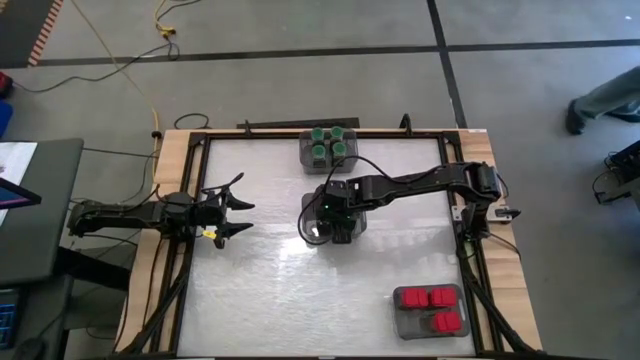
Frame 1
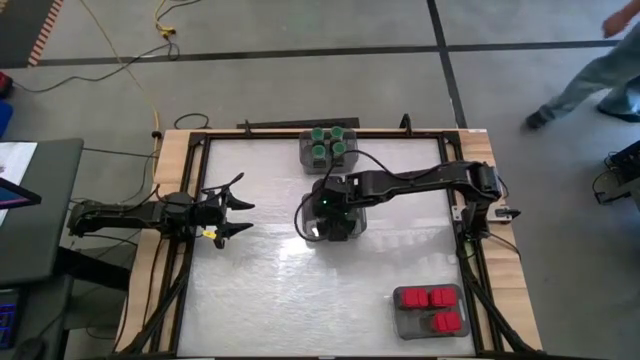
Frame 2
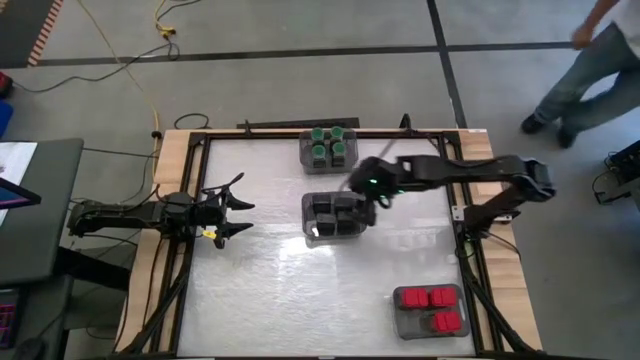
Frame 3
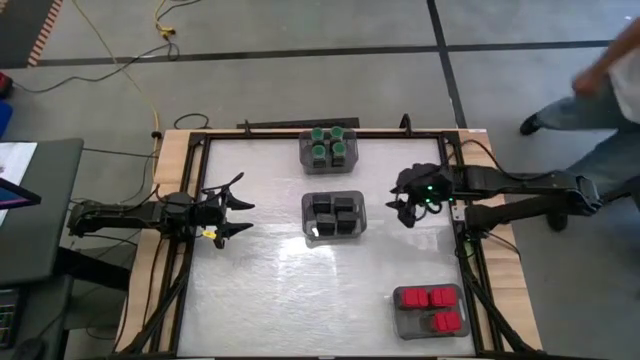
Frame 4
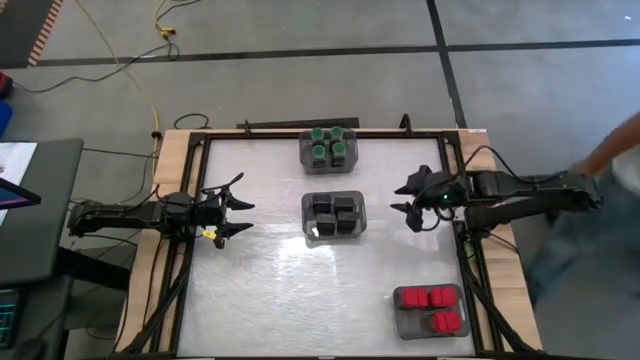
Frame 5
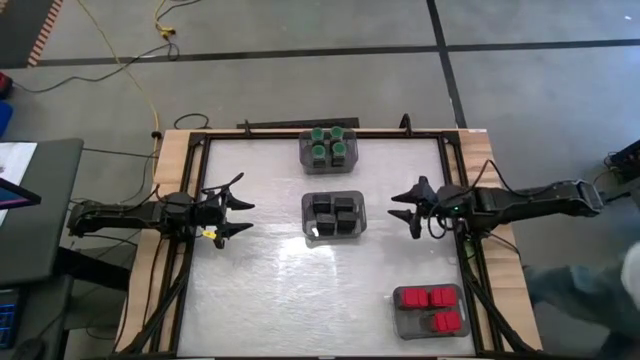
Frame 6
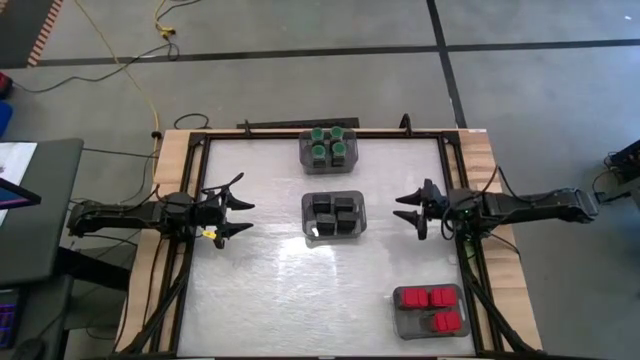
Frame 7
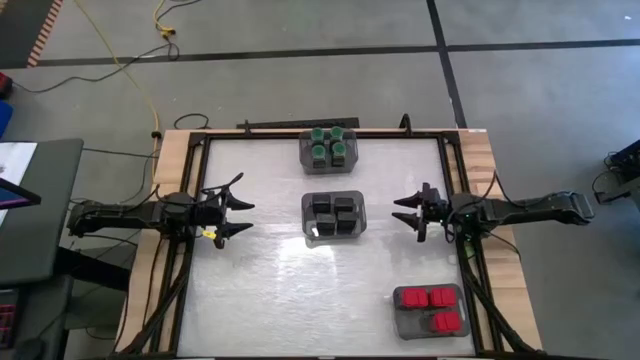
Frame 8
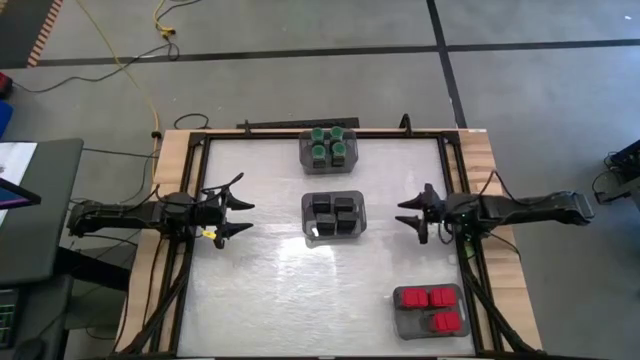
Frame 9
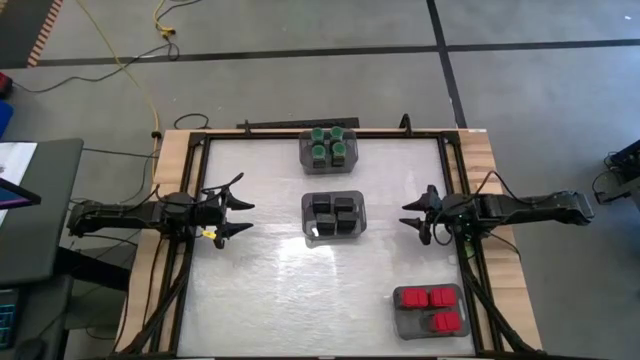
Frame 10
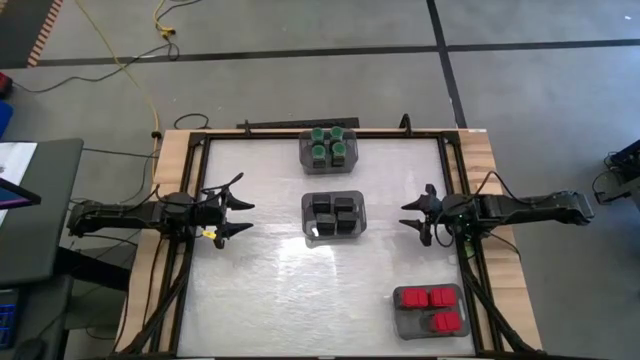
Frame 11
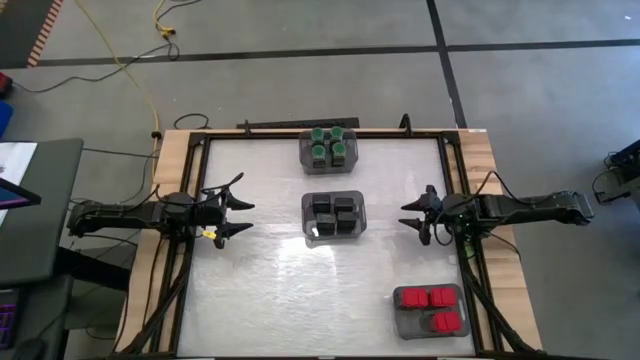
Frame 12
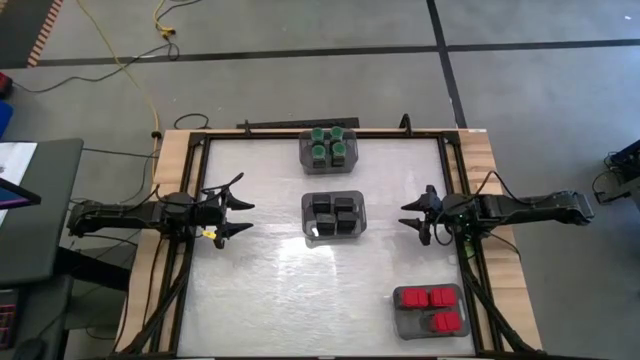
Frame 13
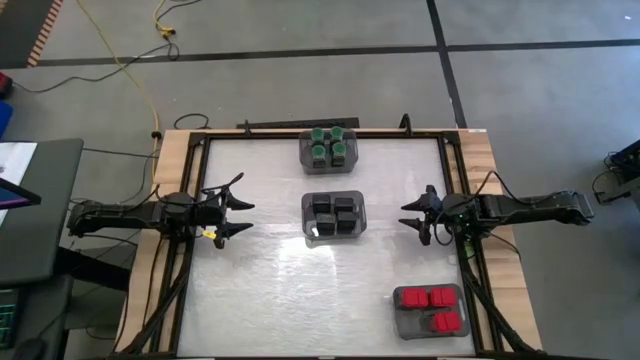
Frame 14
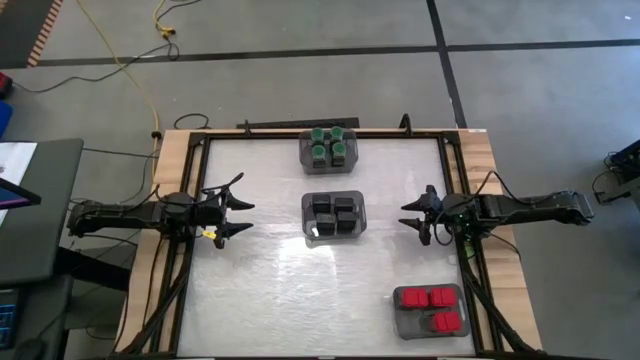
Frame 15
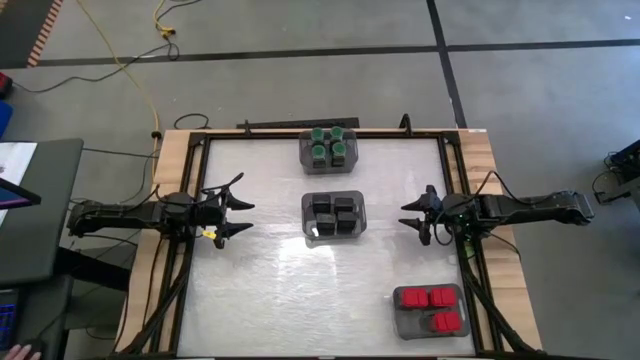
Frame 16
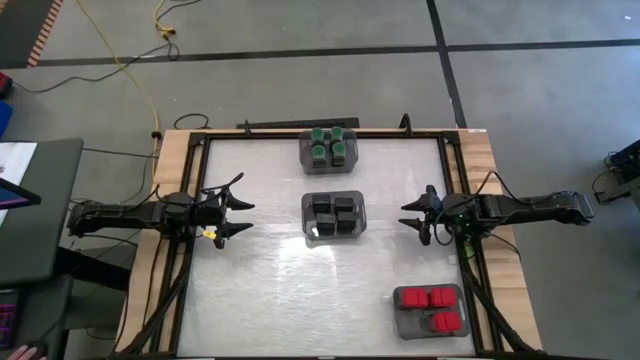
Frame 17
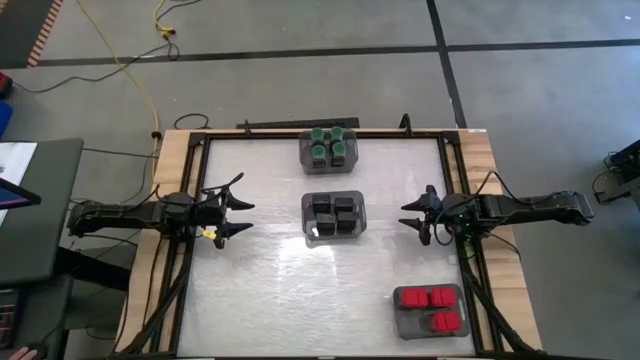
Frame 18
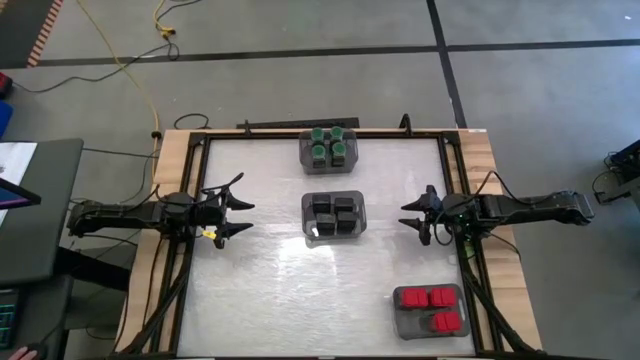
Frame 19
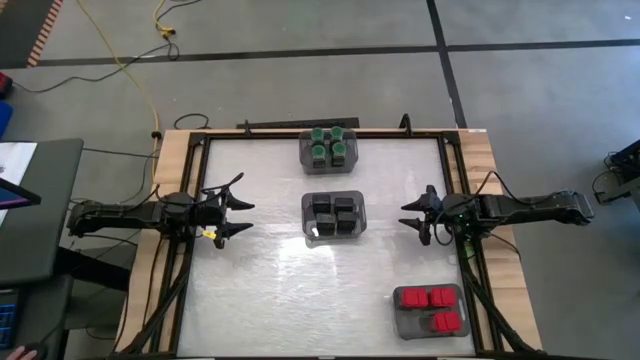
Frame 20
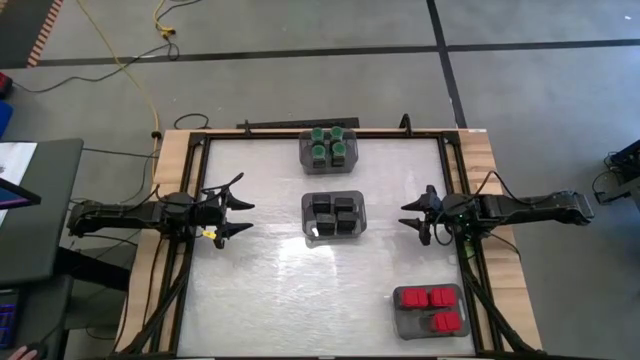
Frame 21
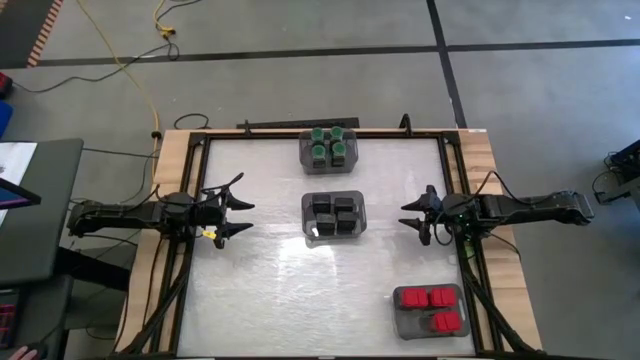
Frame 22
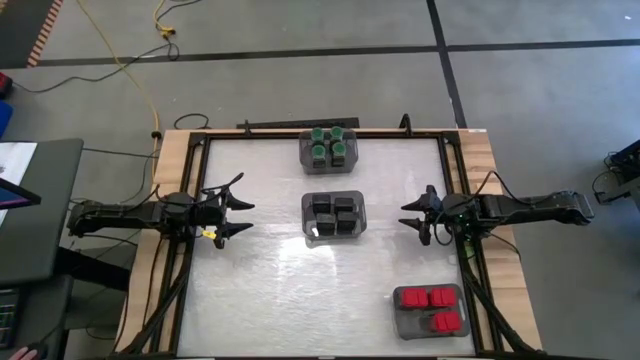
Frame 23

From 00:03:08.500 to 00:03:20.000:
Task: Sort spices by type
Return to Home Position

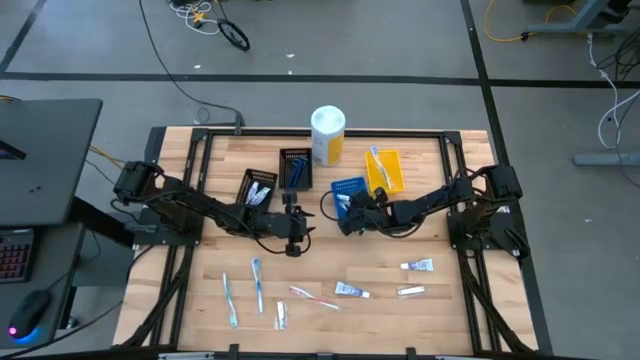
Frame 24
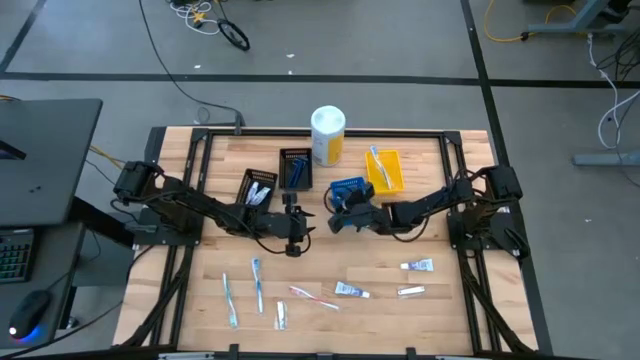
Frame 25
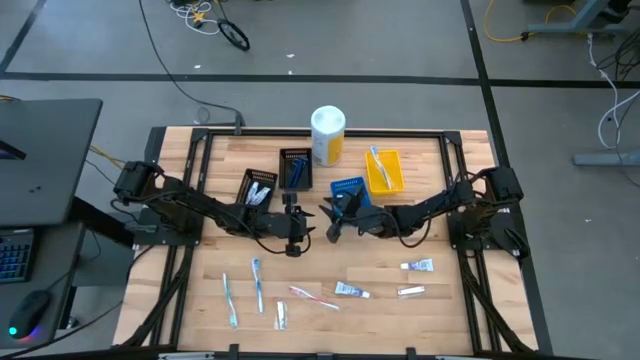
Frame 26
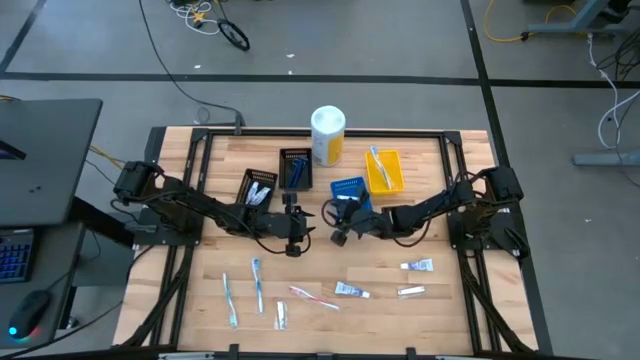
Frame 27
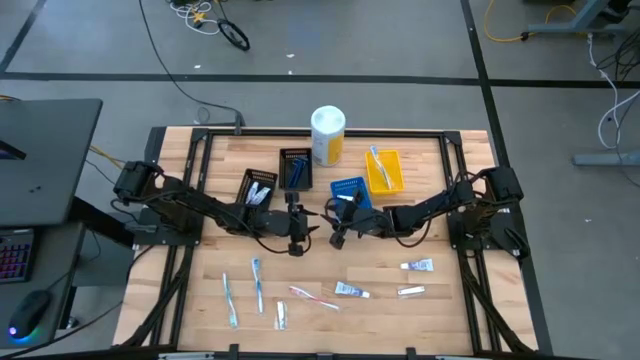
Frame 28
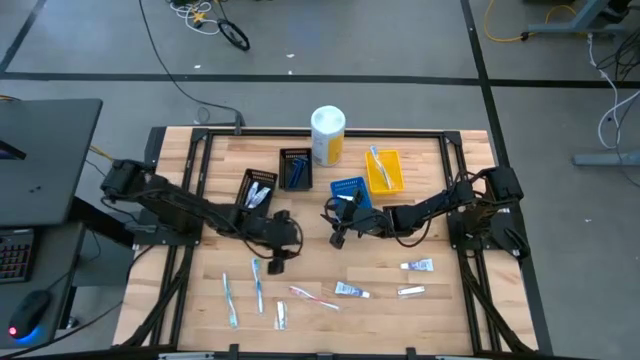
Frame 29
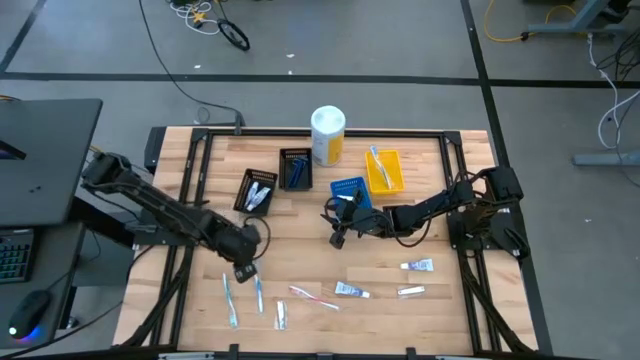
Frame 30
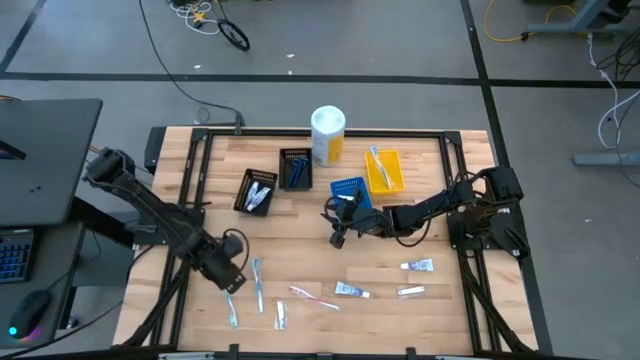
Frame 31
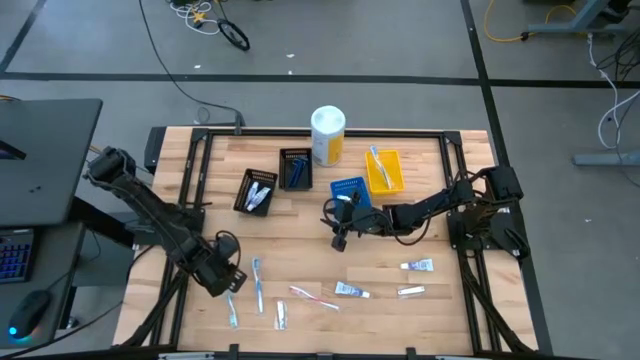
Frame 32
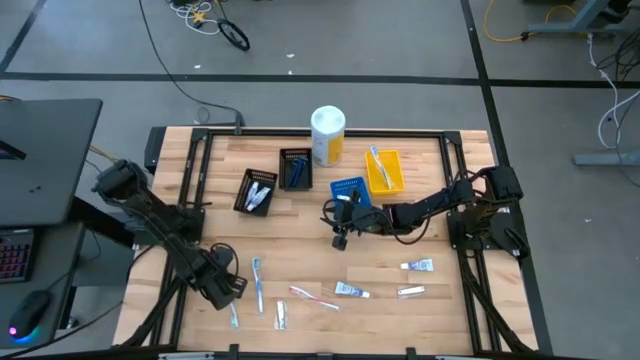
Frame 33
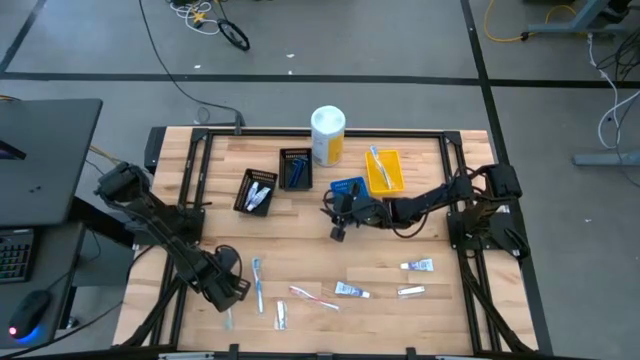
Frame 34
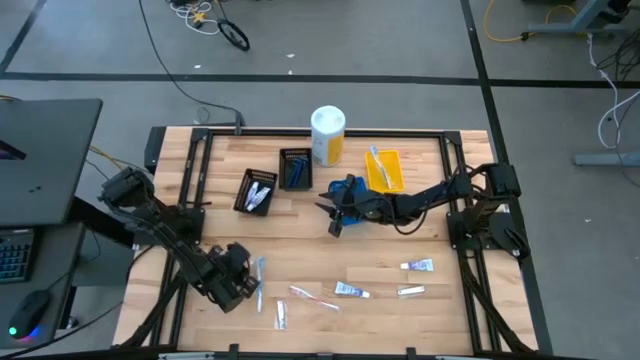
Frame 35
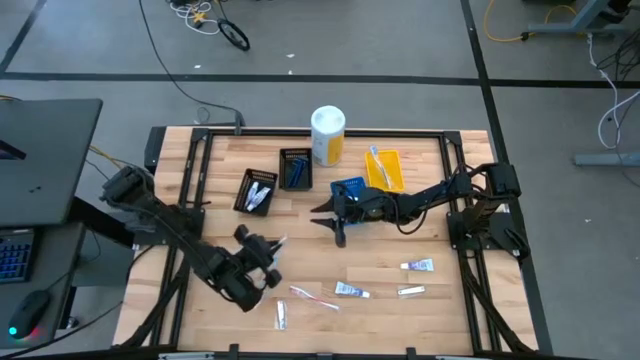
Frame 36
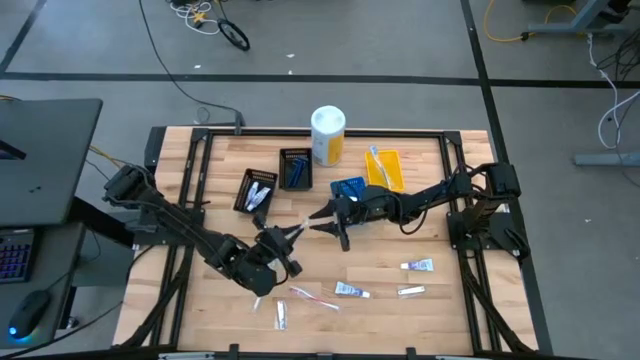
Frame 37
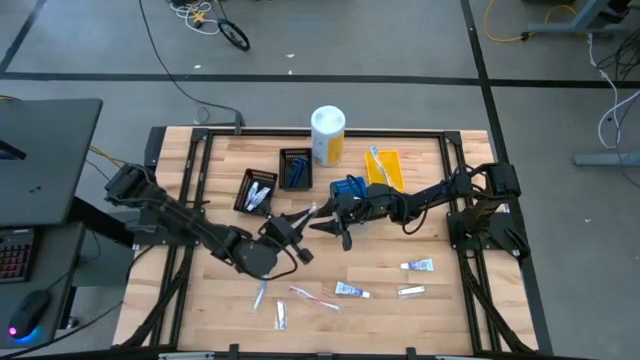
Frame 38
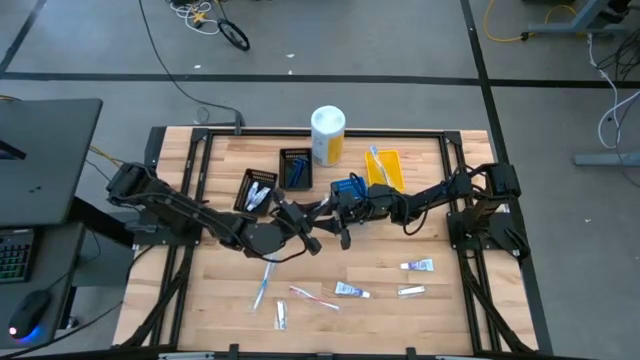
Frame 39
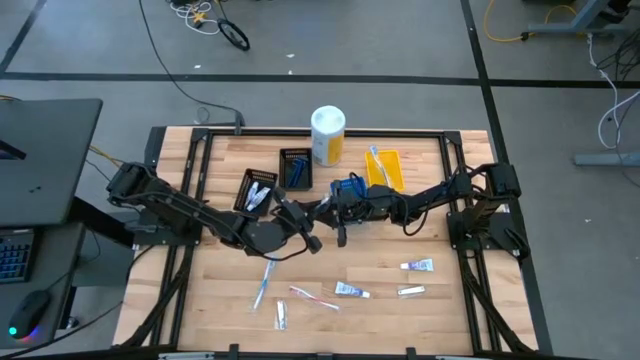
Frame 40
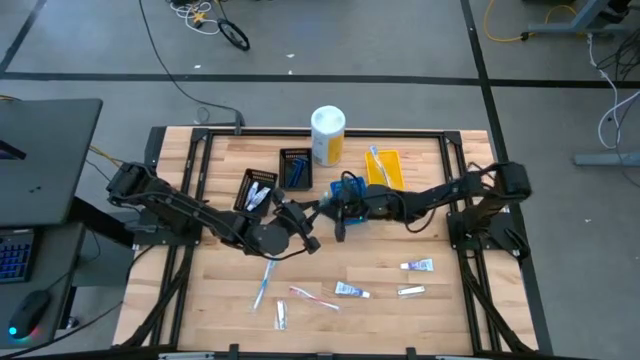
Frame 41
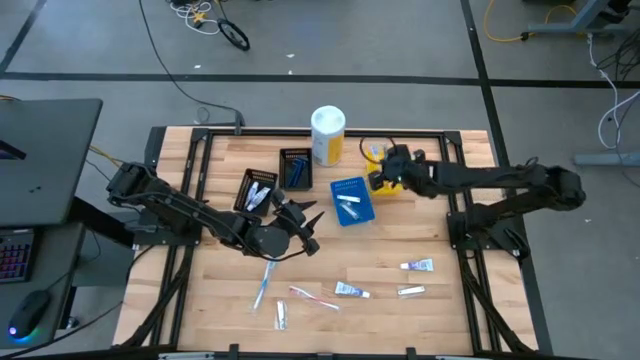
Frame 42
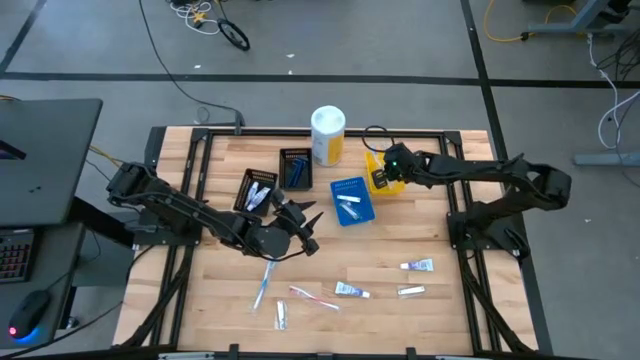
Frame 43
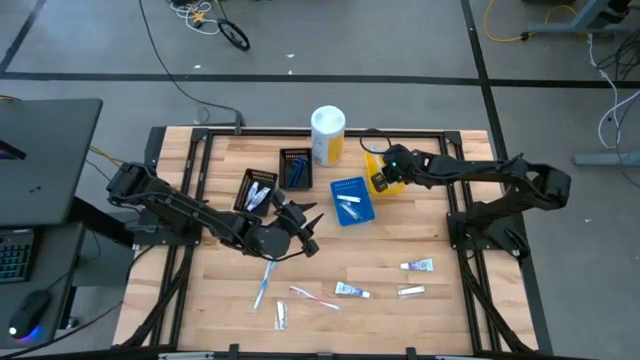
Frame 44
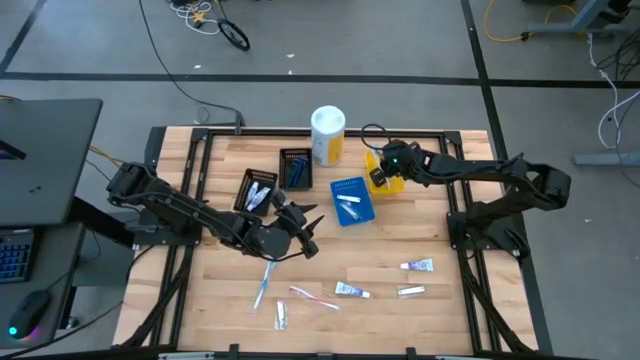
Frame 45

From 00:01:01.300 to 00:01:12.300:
Task: Pick & Place Travel size toiletries
Put the green toothbrush into the yellow bin
